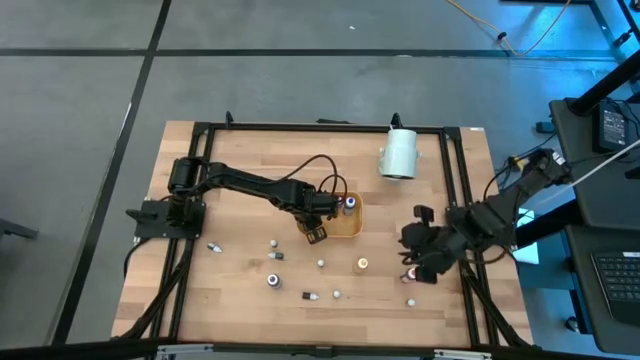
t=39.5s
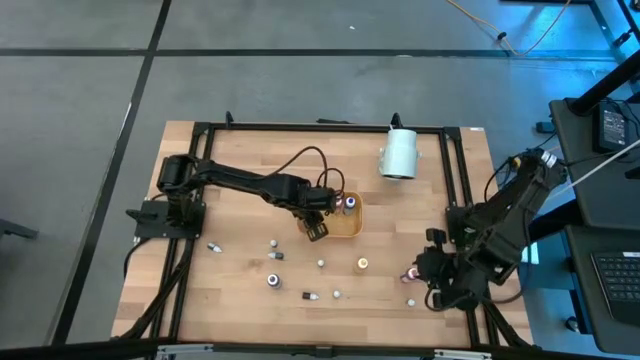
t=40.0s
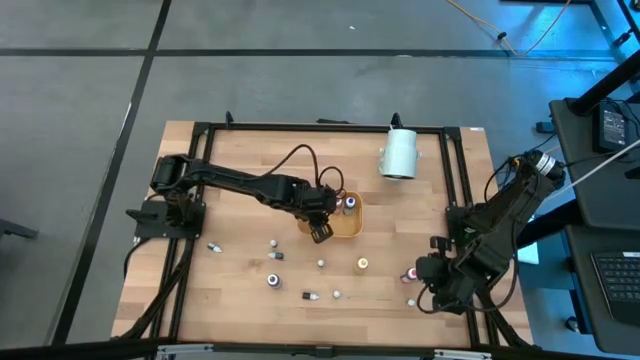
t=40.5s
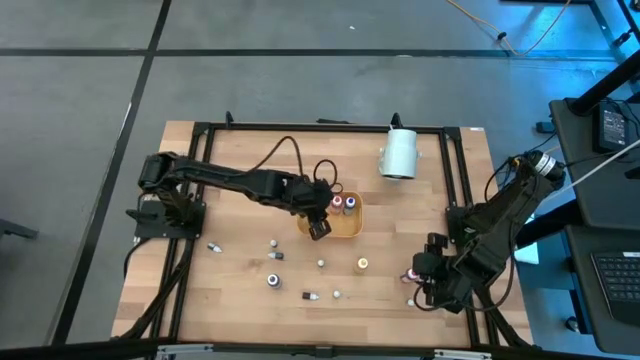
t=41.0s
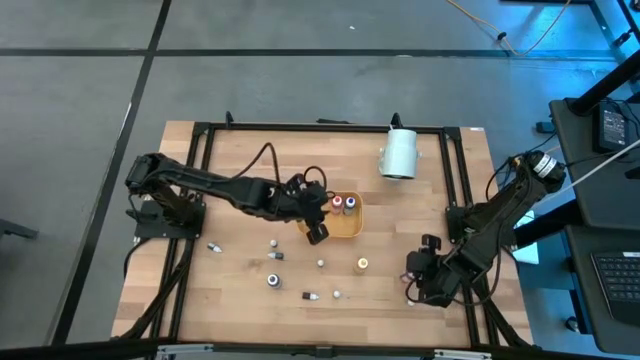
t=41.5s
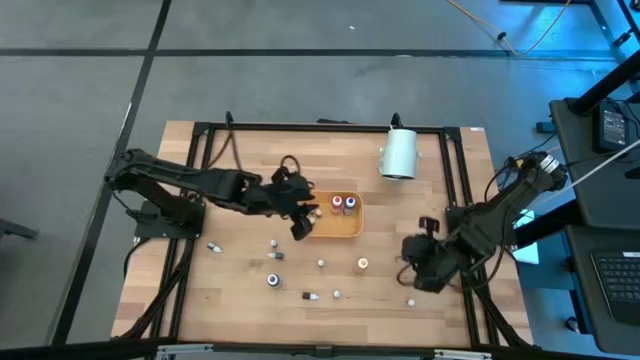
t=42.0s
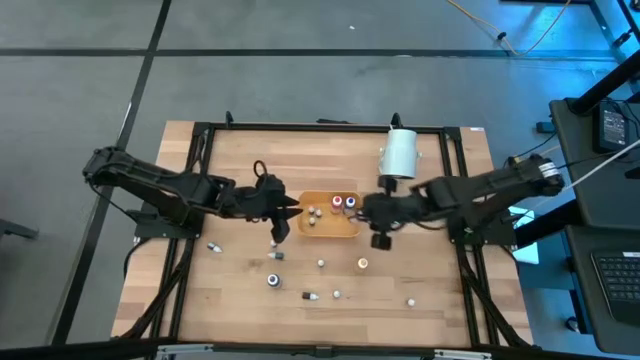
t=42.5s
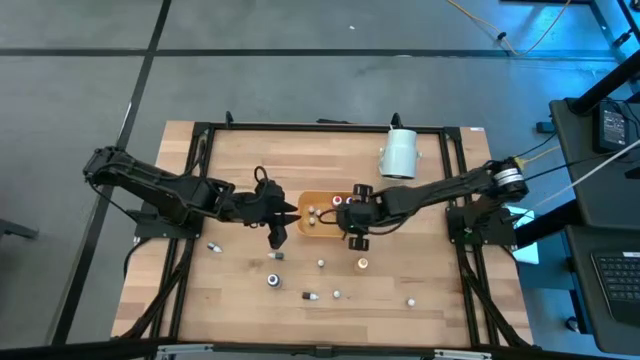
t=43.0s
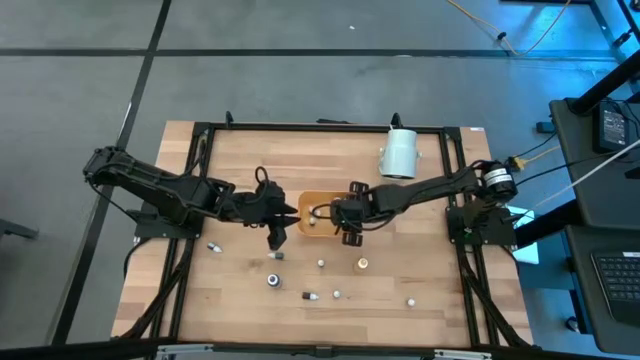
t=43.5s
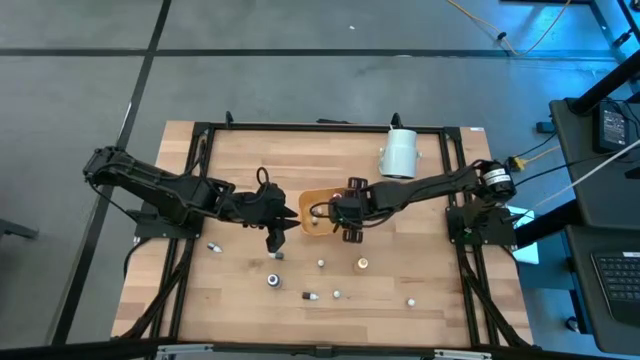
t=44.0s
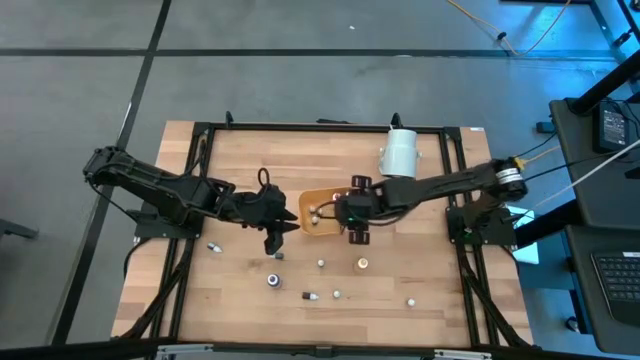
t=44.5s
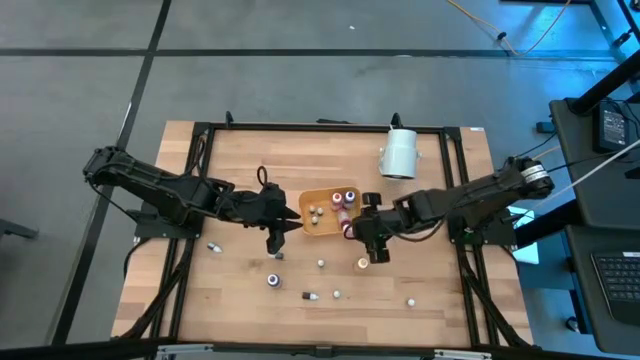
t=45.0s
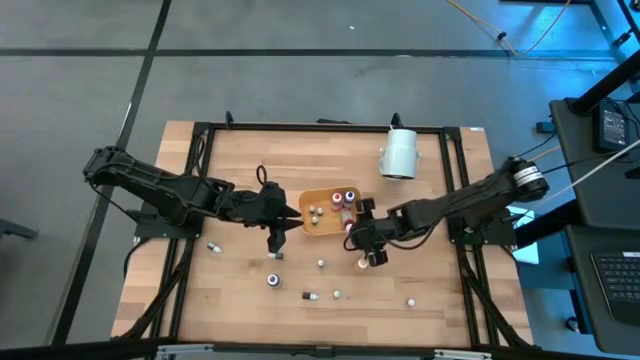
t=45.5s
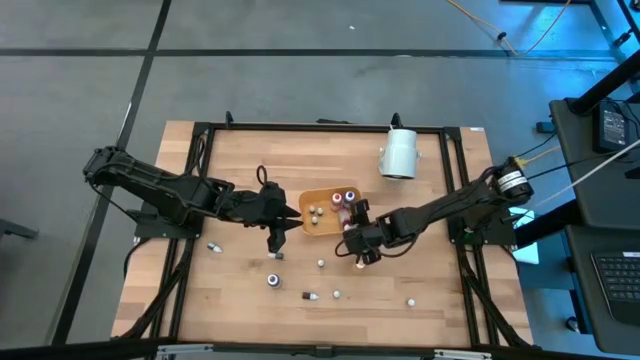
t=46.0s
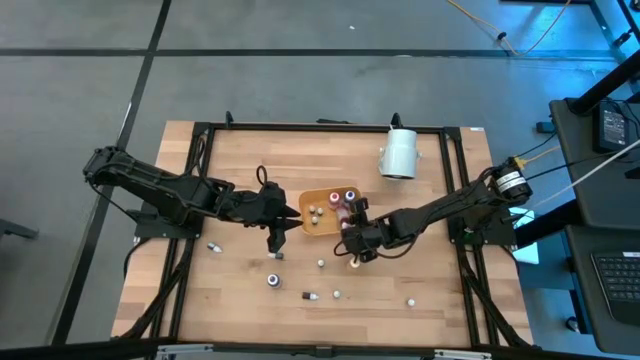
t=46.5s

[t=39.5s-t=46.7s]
Task: Pick & Place food coloring
Put the large pink food coloring bottle into the yellow bin

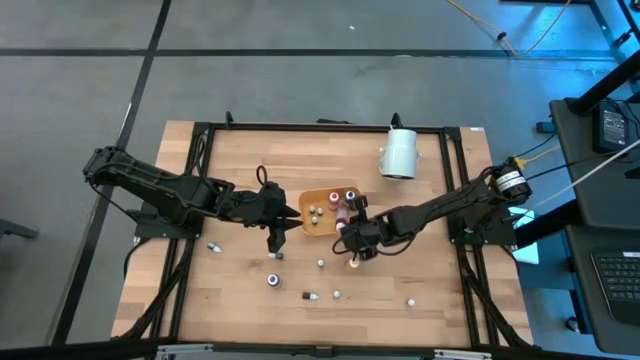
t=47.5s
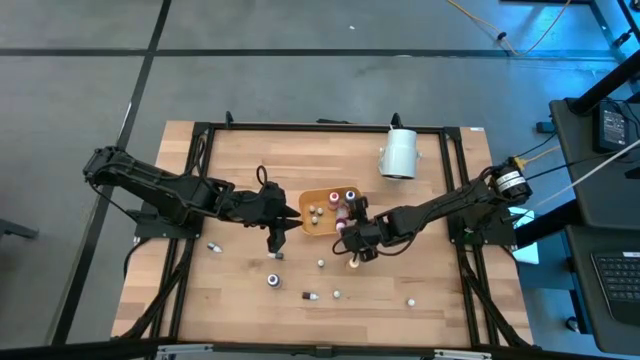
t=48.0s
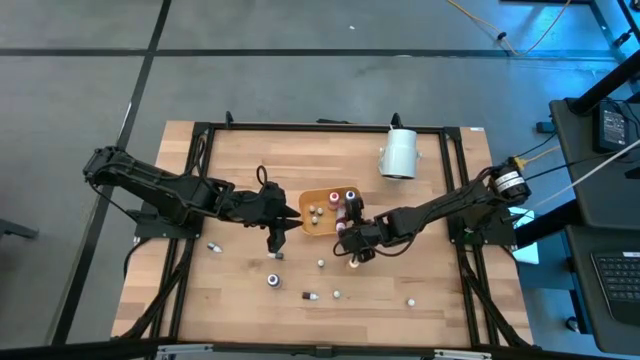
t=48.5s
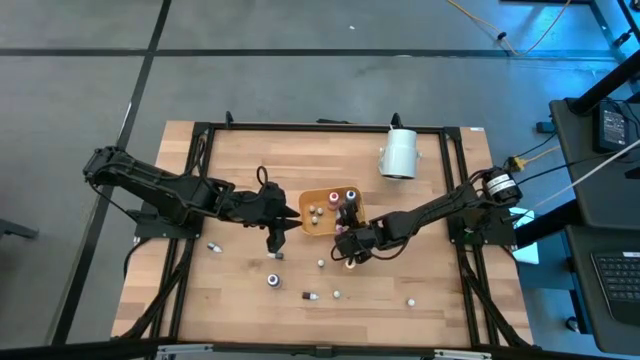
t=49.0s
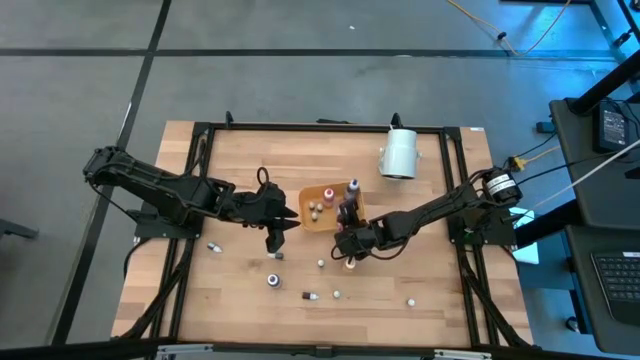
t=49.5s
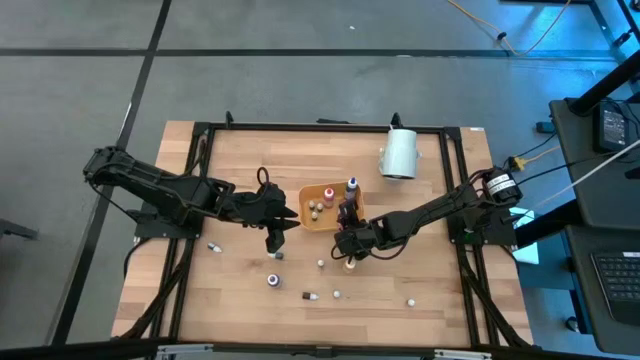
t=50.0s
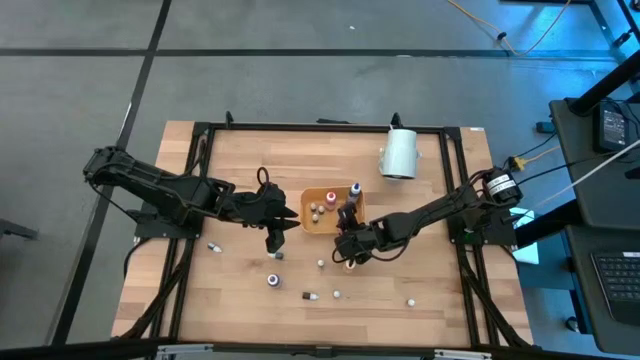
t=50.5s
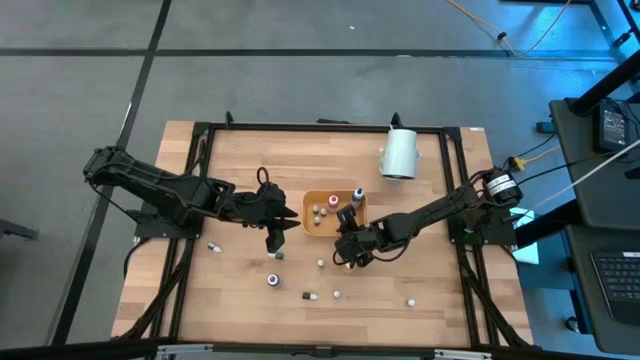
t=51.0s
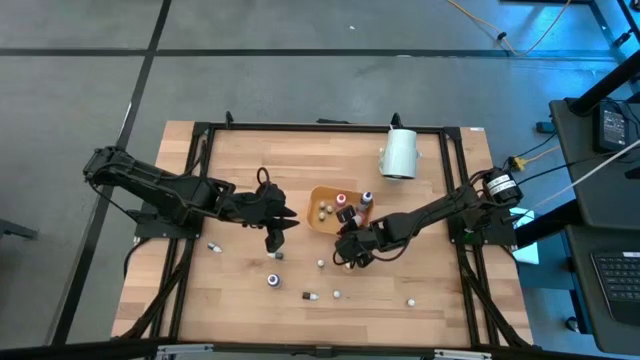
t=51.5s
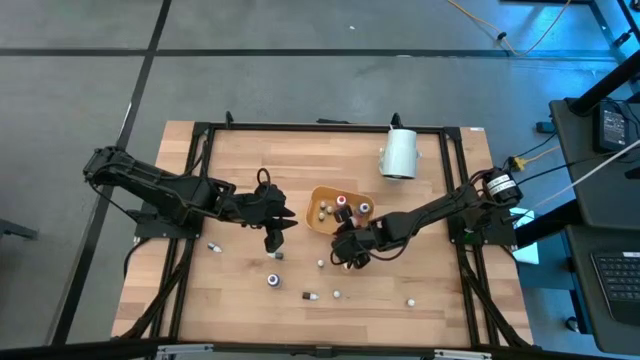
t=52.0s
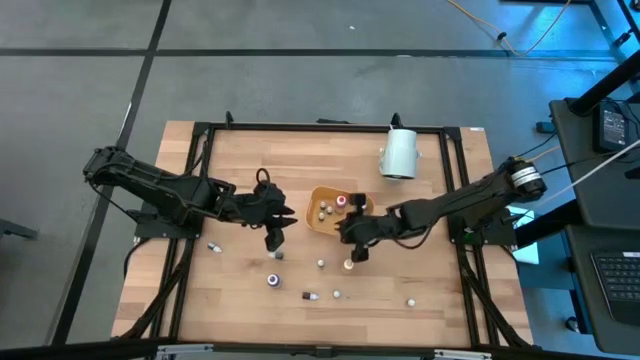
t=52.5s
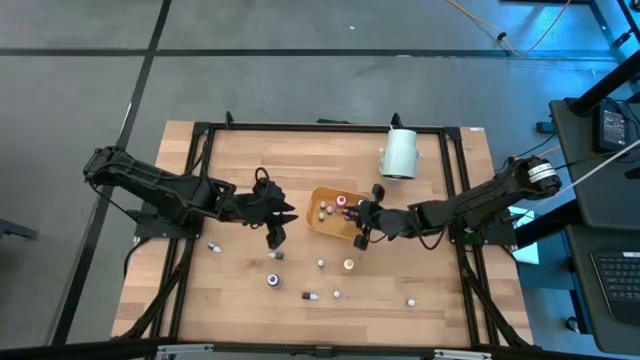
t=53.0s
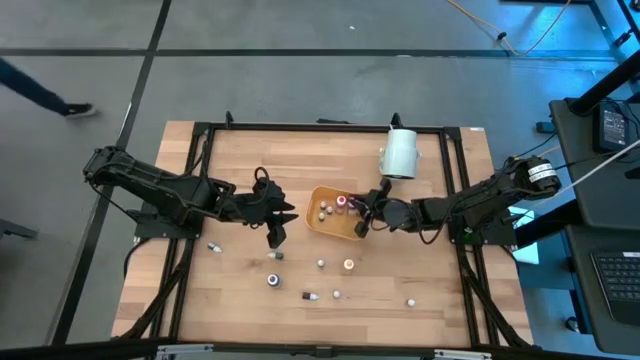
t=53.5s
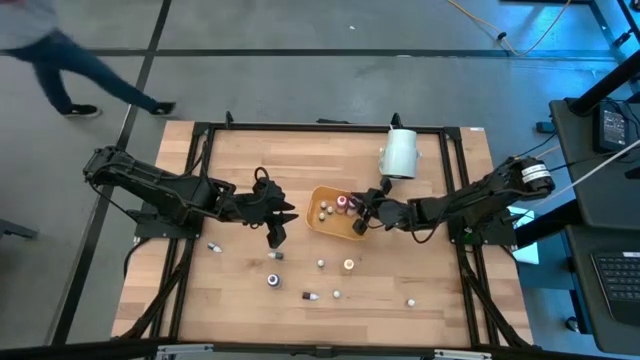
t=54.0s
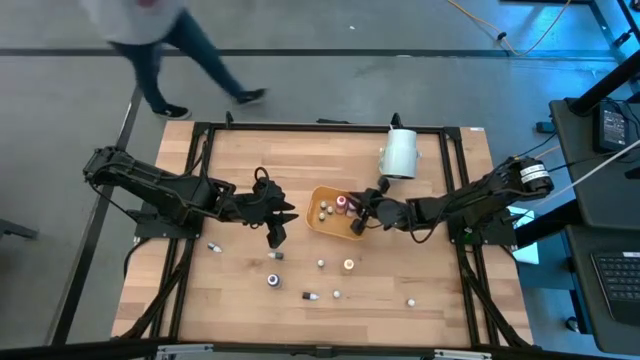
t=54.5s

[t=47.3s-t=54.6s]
Put the large pink food coloring bottle into the yellow bin

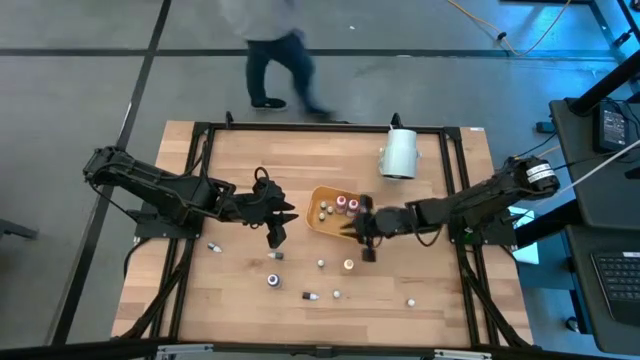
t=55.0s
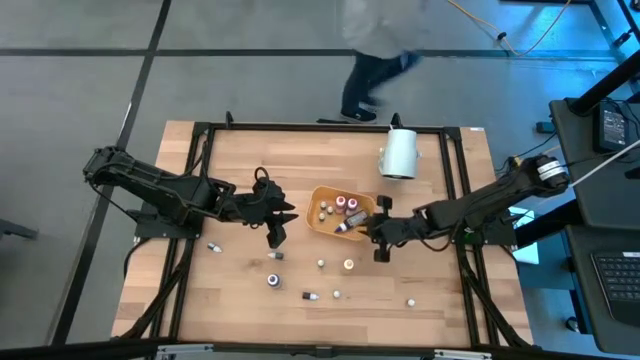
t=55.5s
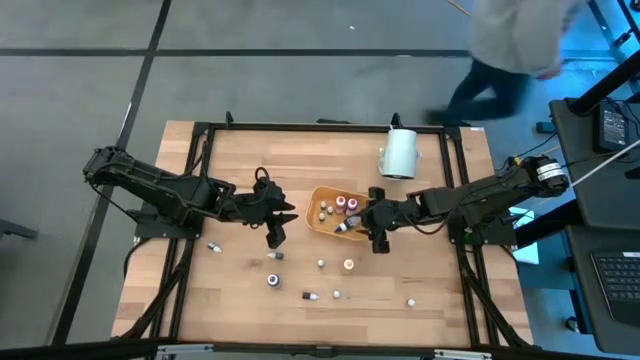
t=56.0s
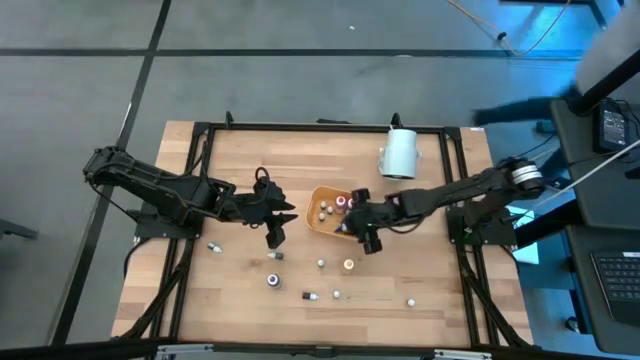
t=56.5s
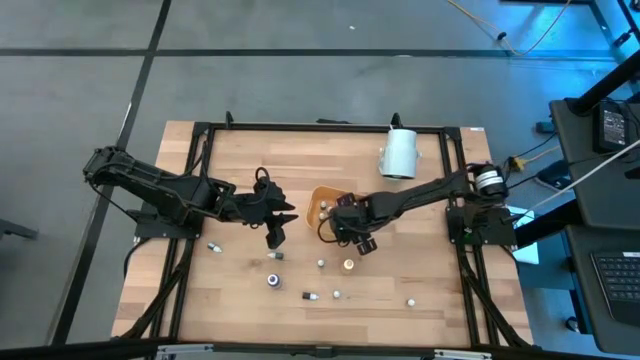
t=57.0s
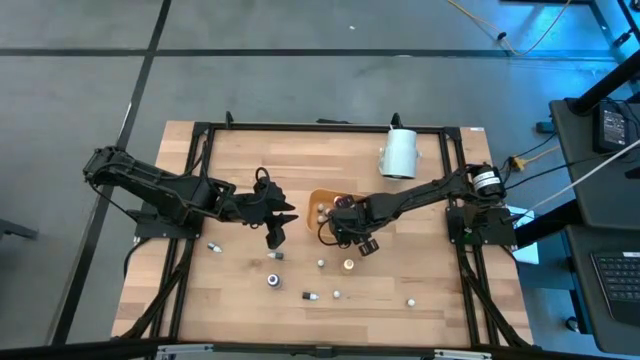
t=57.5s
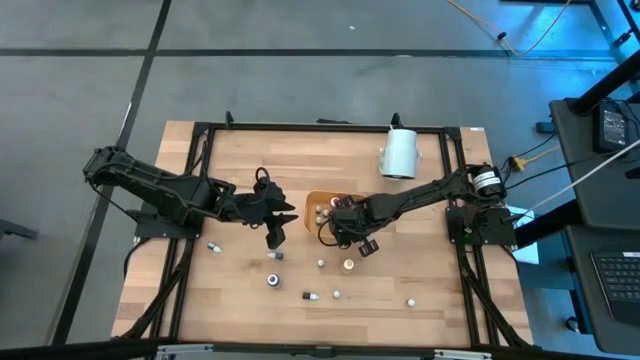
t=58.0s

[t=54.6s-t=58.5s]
Adjust the large blue food coloring bottle in the yellow bin

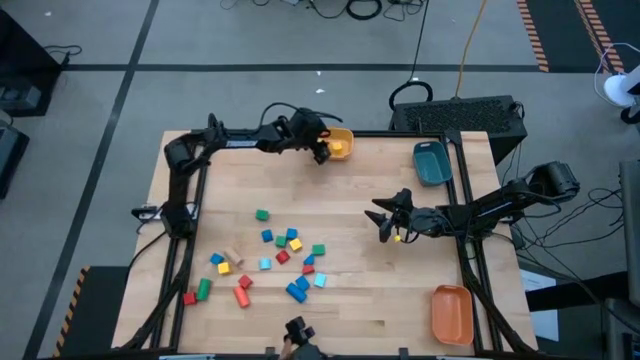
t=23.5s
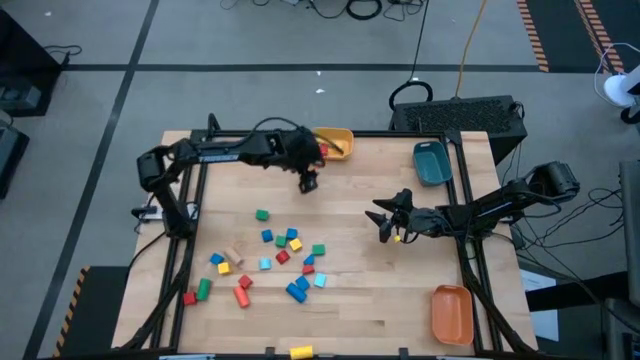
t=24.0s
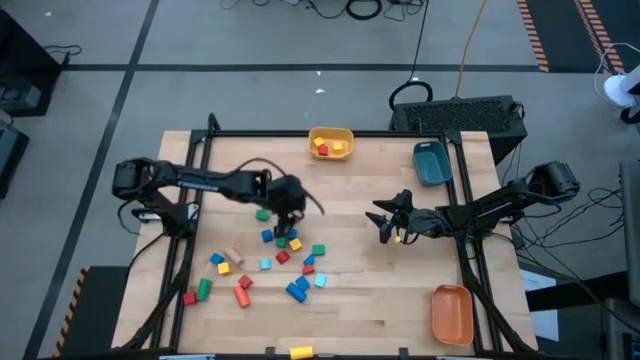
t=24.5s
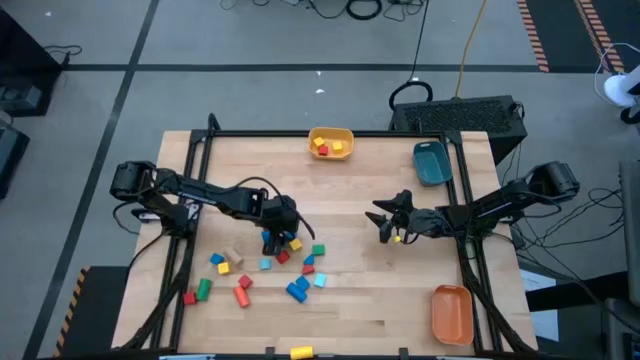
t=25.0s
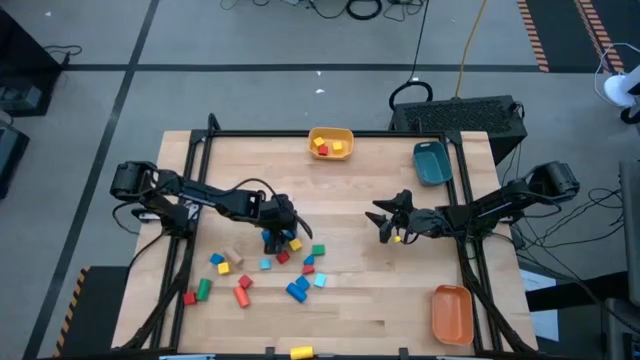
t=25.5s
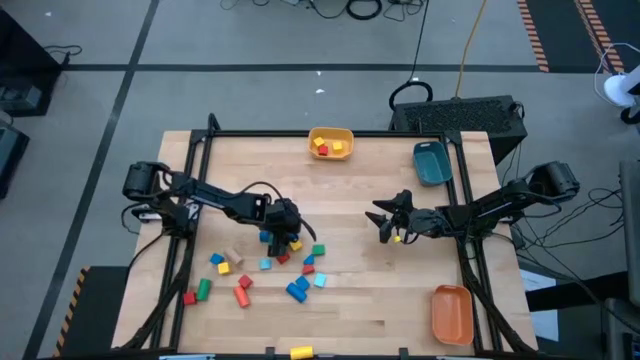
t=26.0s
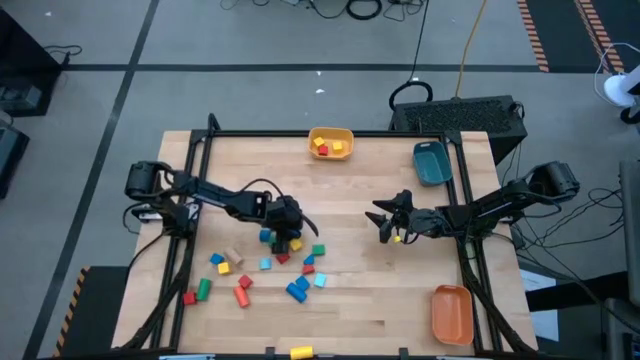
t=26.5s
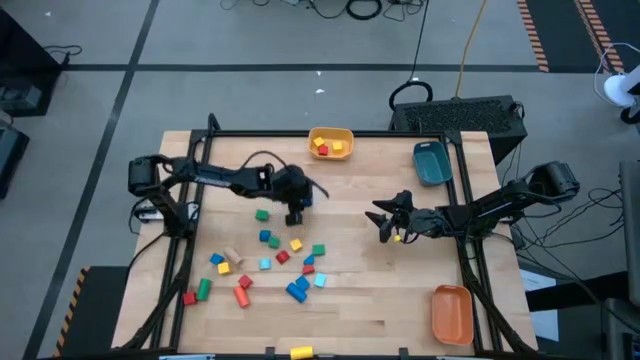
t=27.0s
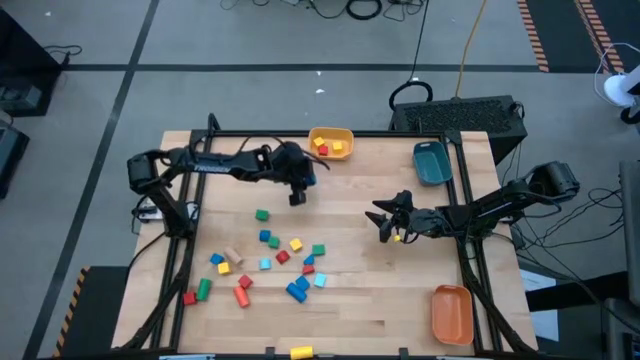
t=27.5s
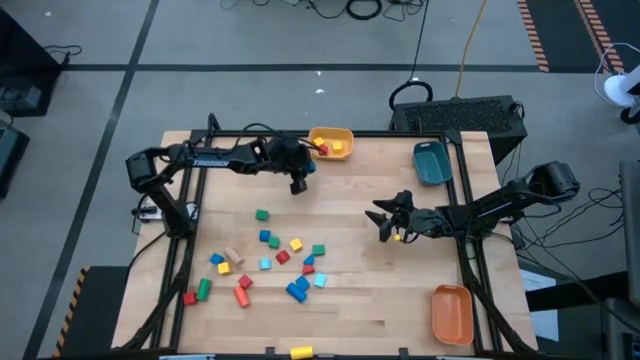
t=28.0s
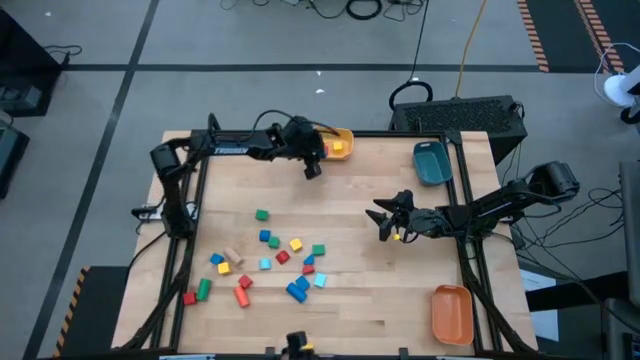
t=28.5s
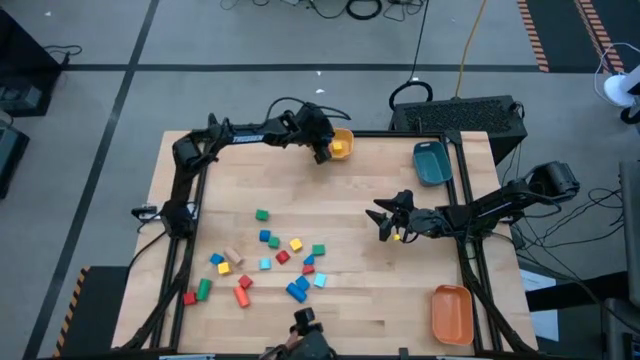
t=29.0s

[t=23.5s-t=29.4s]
Task: Sort blocks by size
Put the blue square block into the yellow bin
